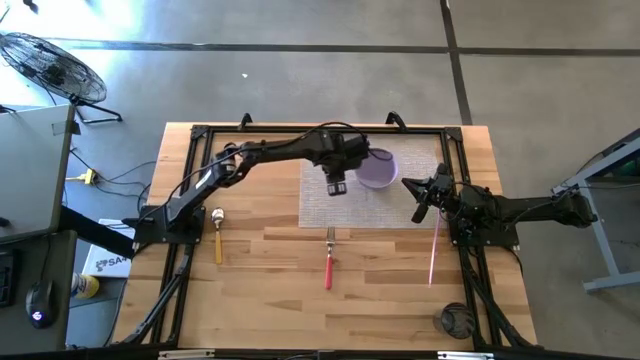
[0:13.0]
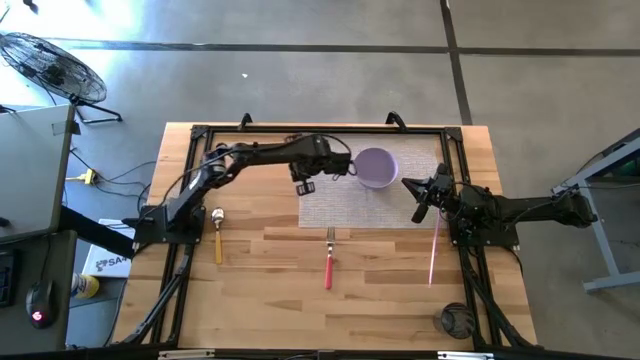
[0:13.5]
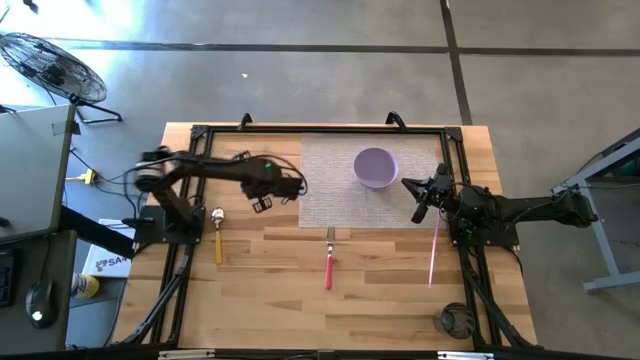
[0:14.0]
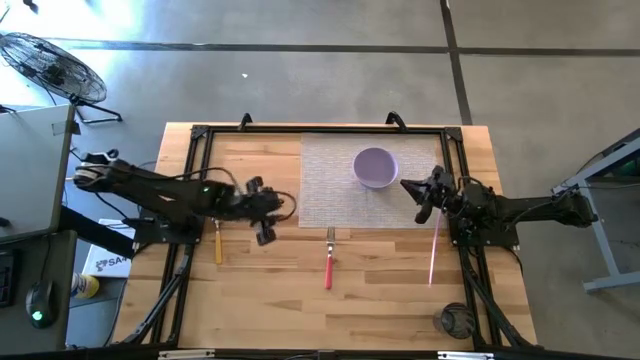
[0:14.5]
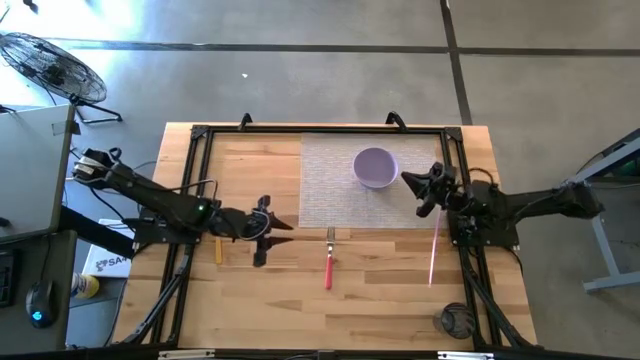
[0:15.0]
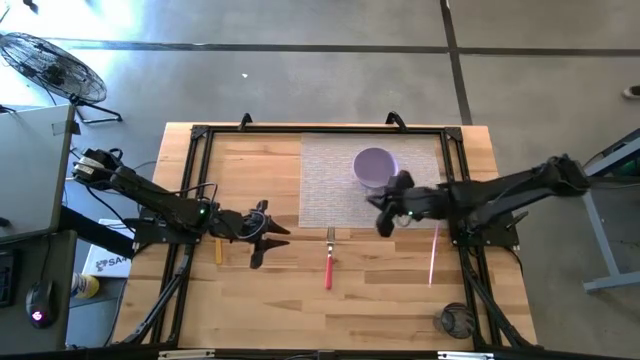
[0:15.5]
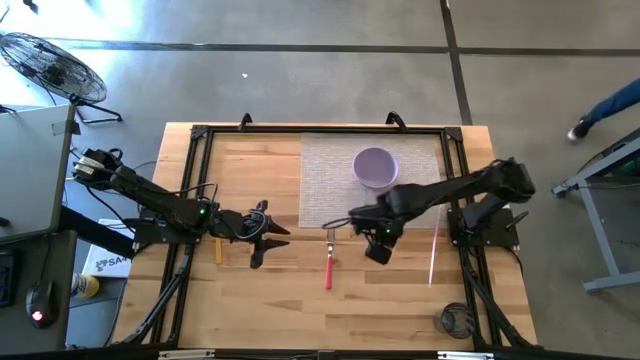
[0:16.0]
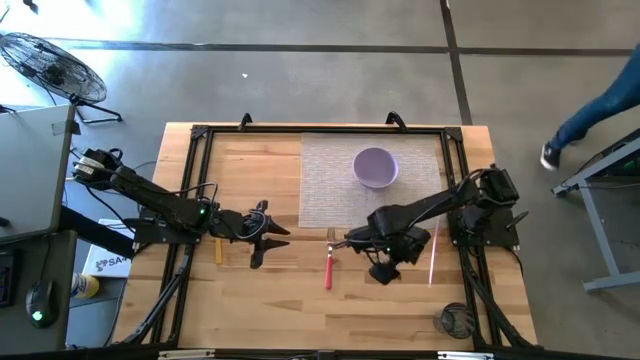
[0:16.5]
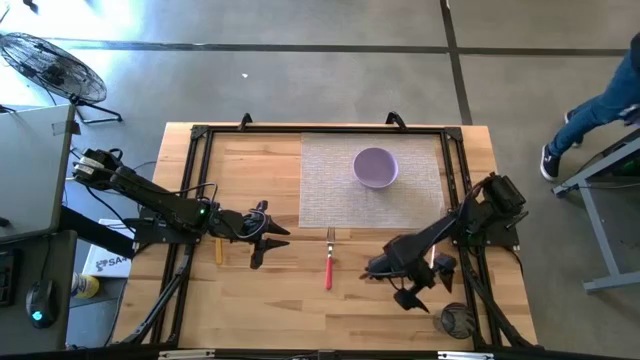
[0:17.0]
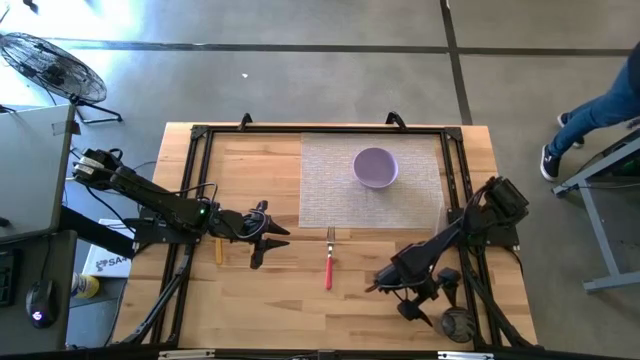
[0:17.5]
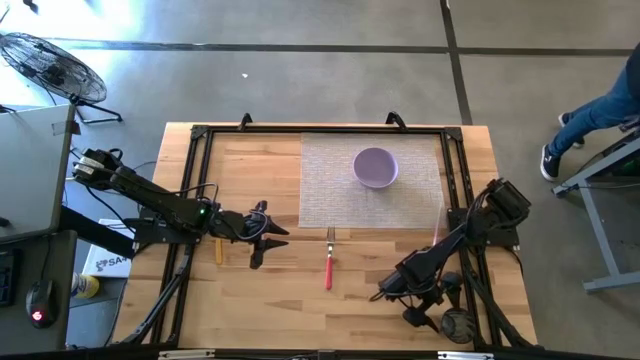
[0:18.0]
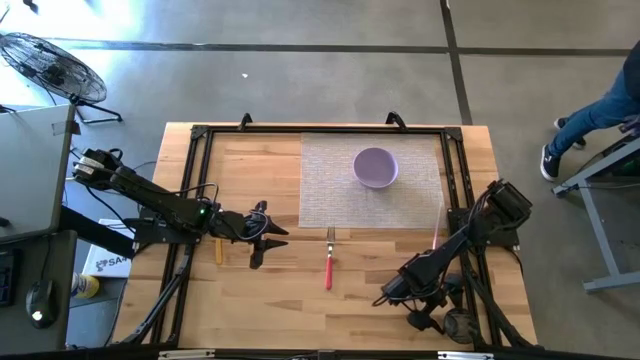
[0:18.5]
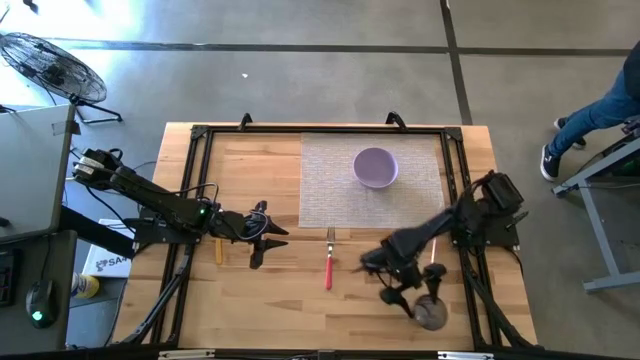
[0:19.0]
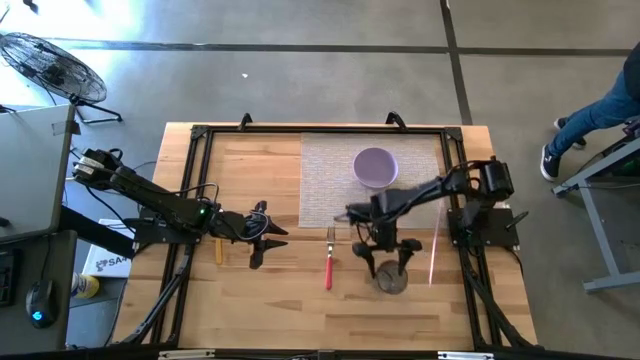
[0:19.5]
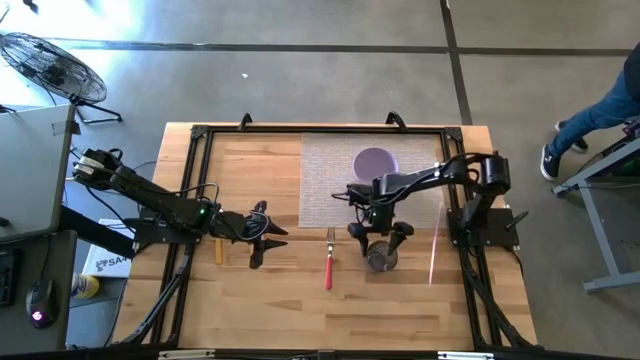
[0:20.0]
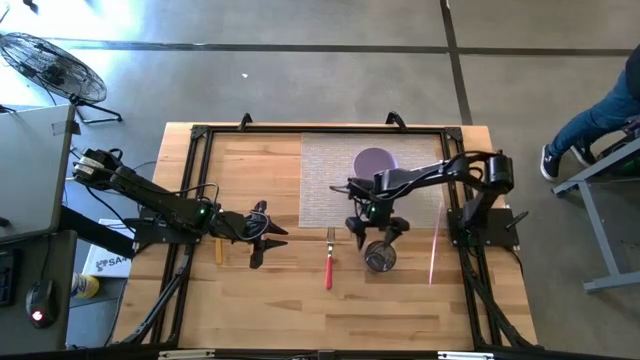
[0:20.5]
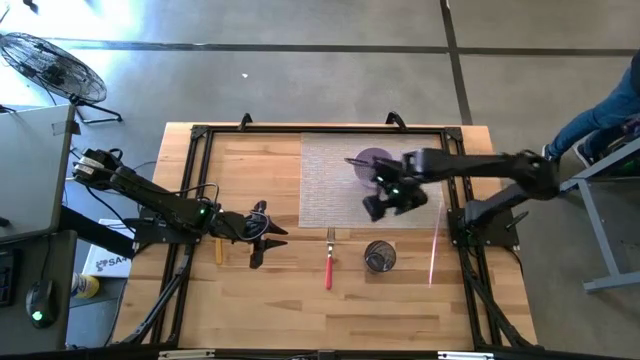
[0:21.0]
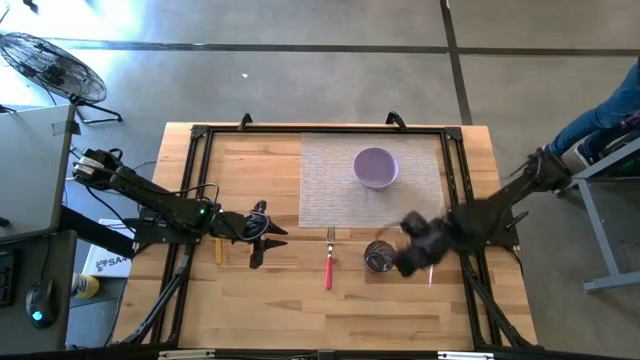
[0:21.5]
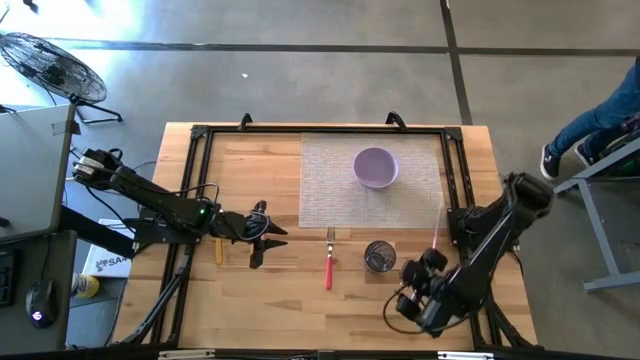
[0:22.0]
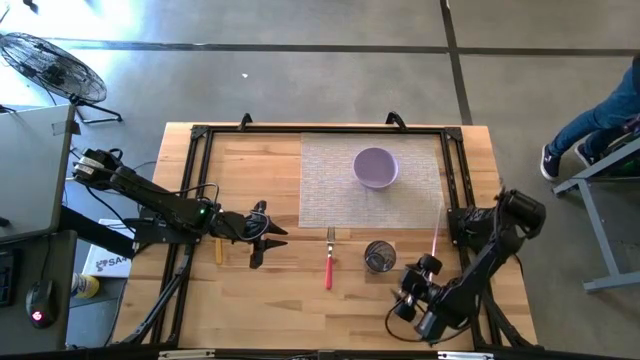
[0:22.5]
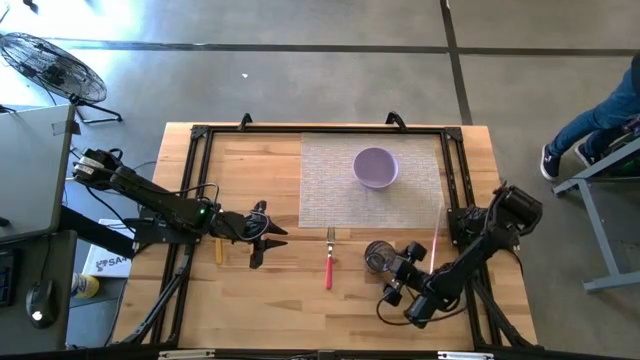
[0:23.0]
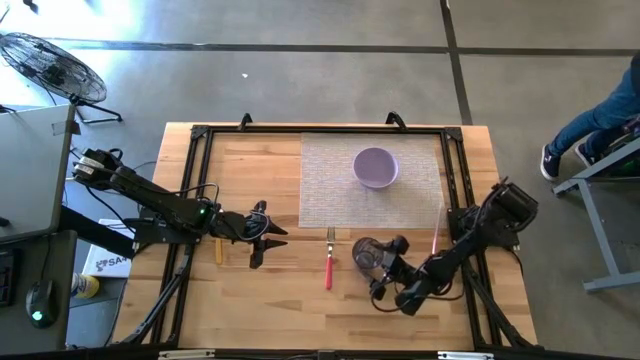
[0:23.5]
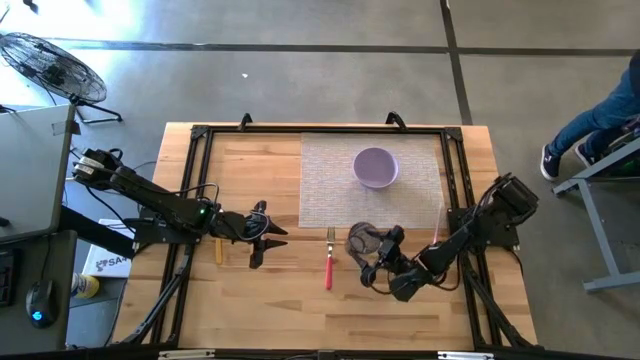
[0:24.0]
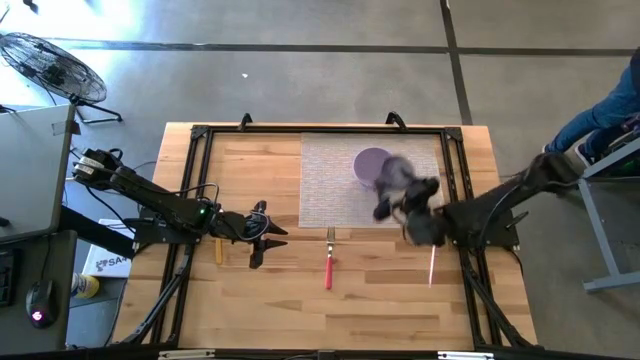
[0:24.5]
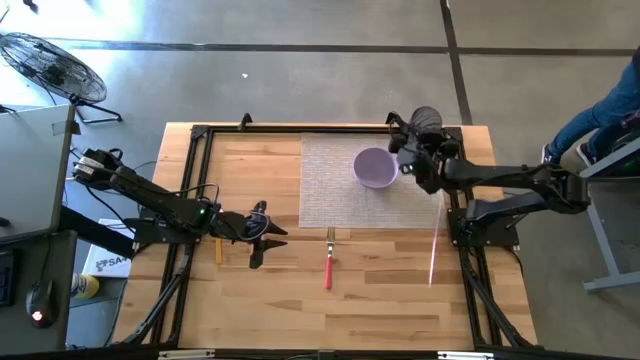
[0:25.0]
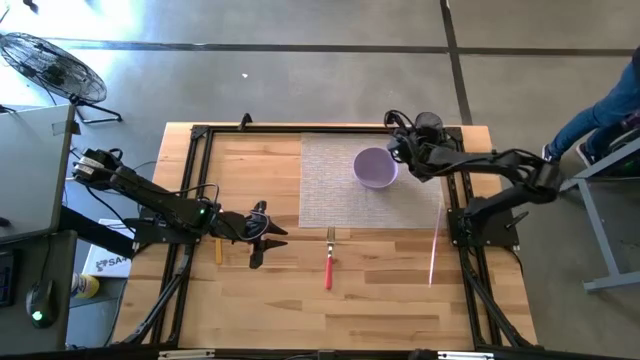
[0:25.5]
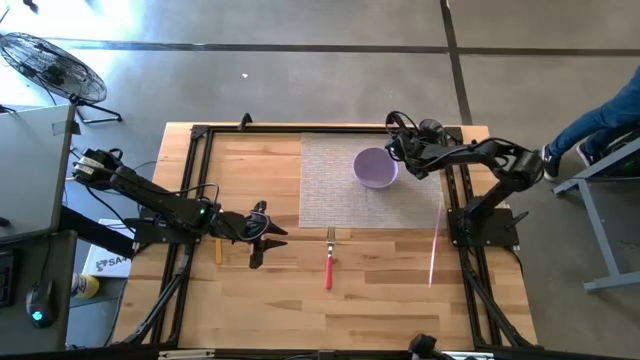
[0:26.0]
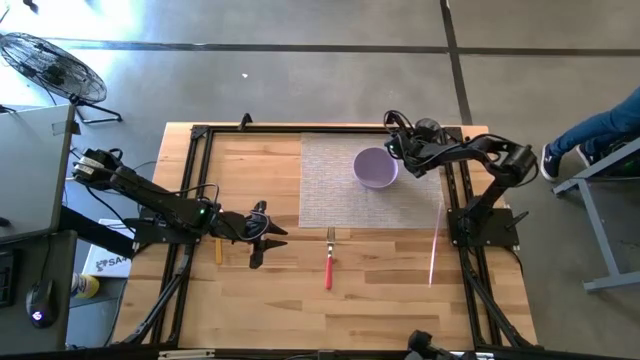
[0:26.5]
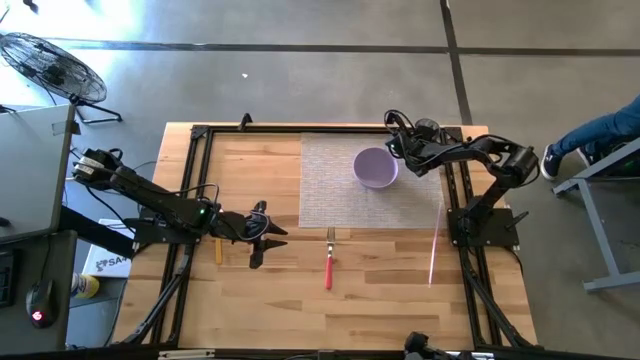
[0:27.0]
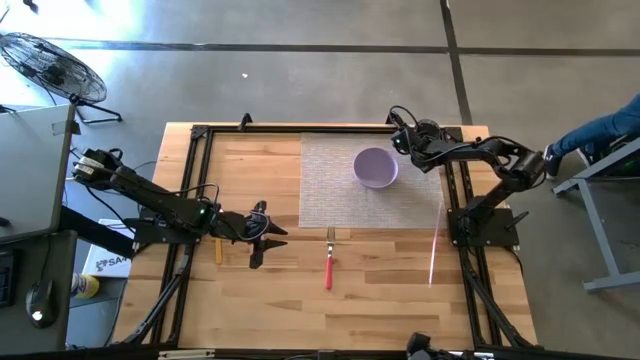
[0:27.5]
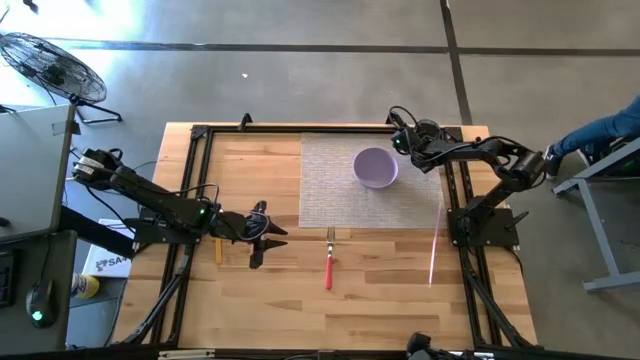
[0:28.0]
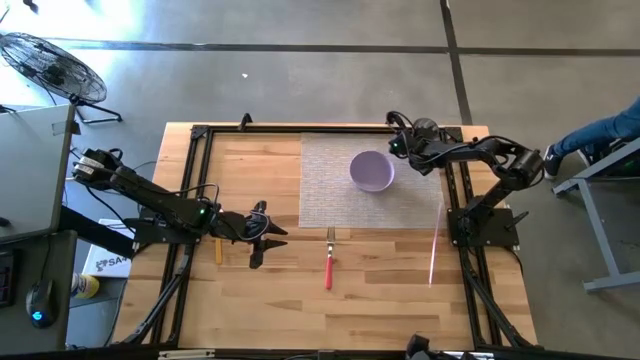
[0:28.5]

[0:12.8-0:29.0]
Task: Pick & Place Utensil
Put the blue cup on the mat to the top right of the purple bowl

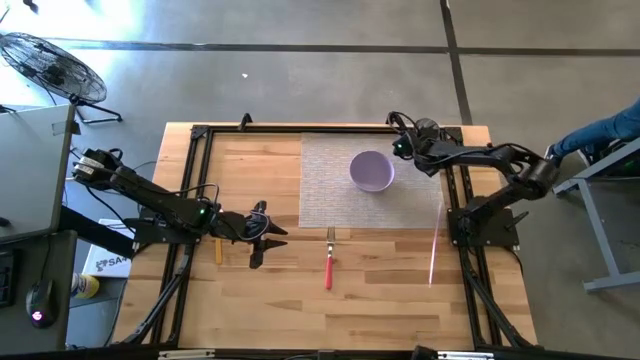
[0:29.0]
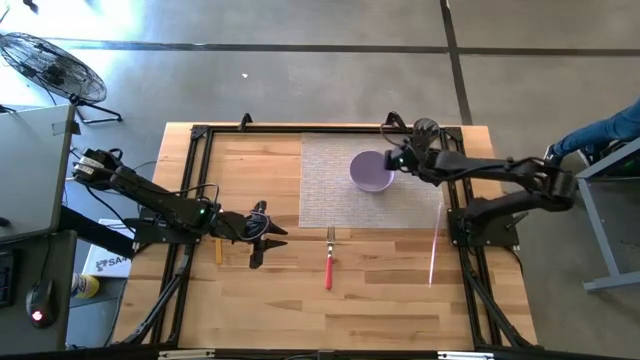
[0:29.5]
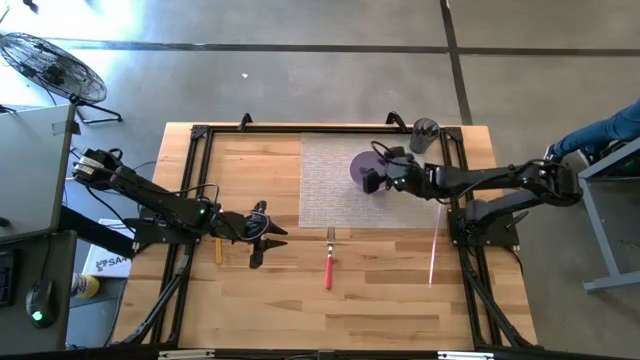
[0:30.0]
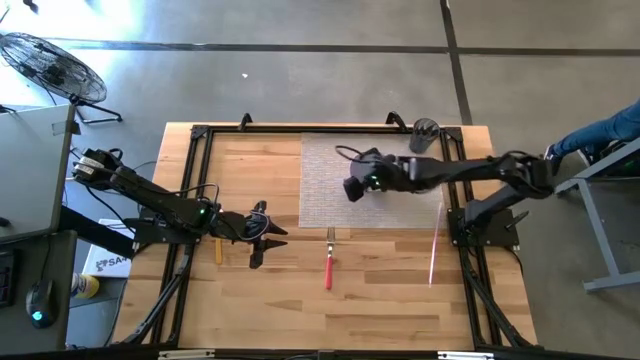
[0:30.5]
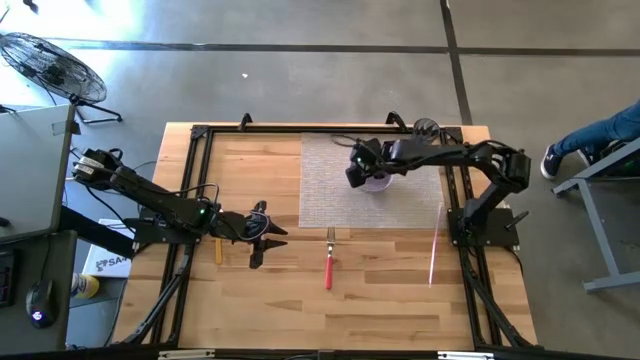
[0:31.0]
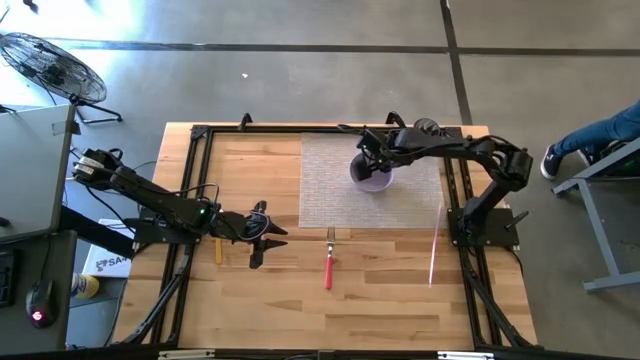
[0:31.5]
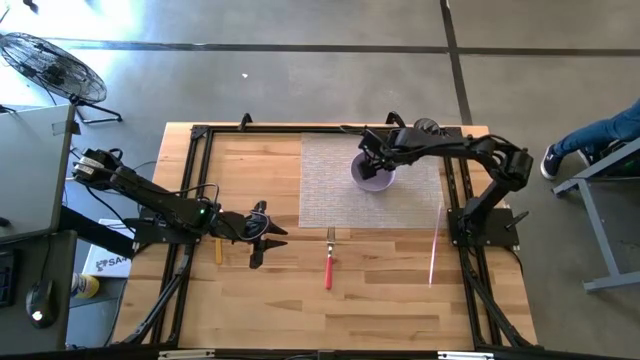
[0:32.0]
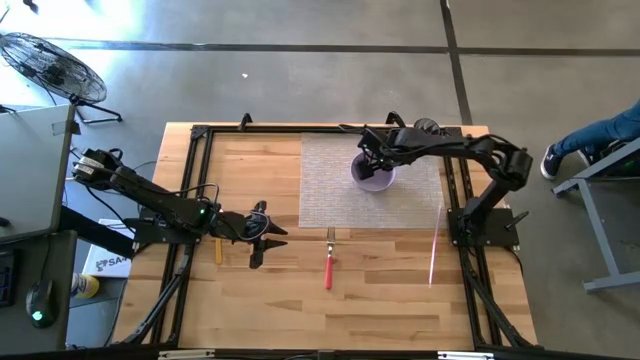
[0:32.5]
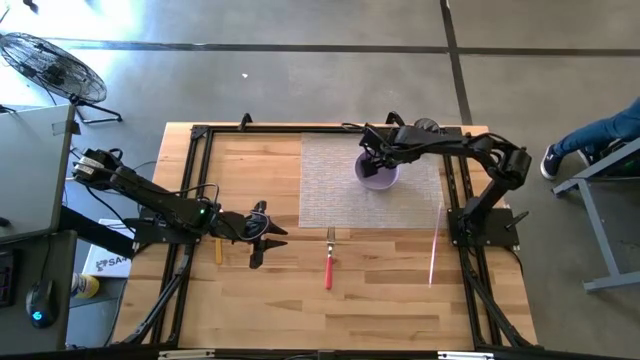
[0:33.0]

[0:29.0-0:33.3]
Adjust the purple bowl on the mat

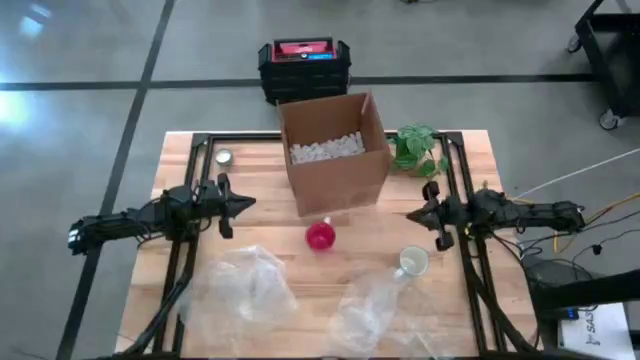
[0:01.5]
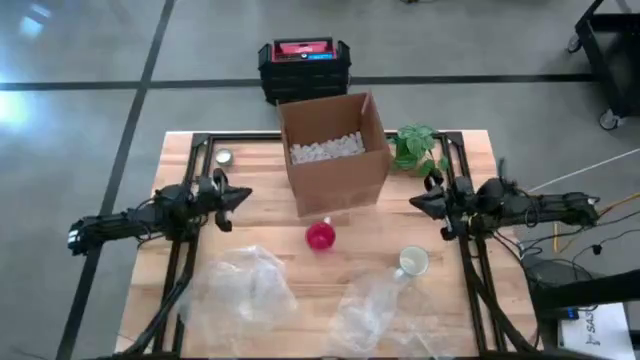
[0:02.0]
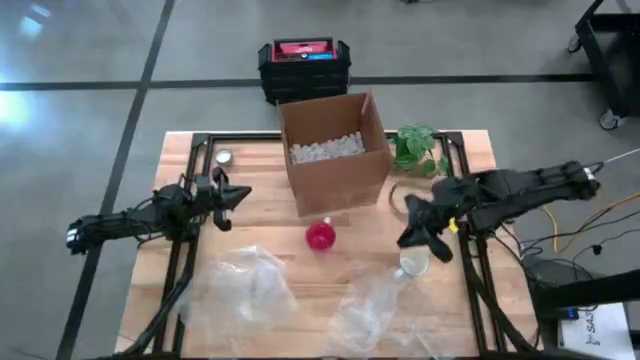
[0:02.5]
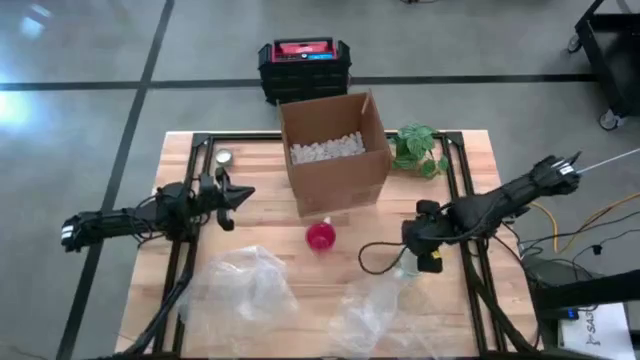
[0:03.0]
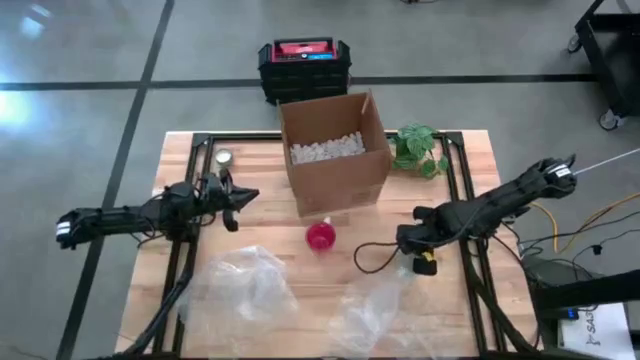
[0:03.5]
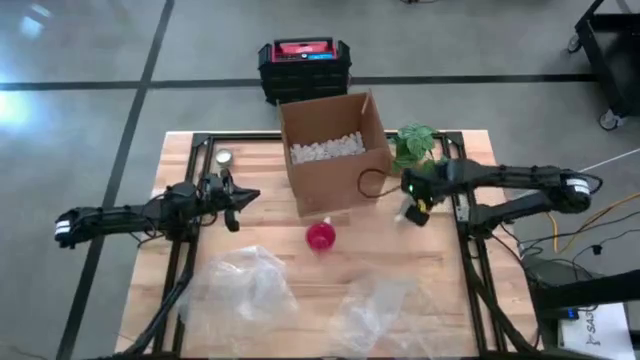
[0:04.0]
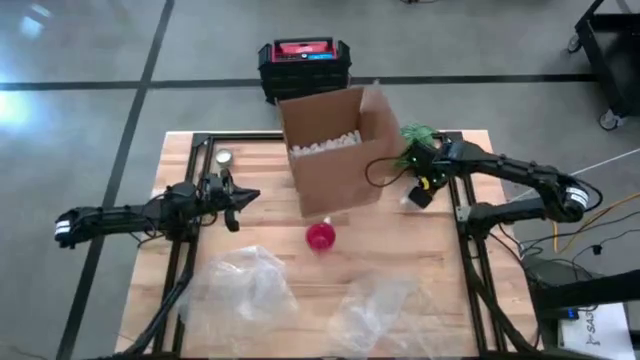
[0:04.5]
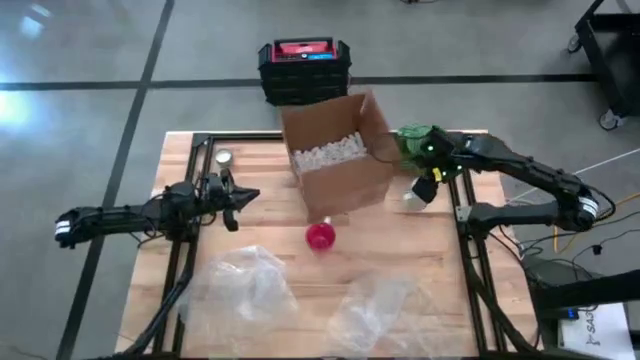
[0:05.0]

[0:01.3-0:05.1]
Task: wrap mug
Move the white mug to the top right of the table
